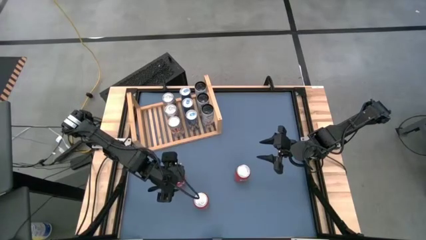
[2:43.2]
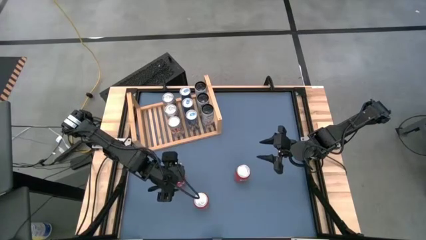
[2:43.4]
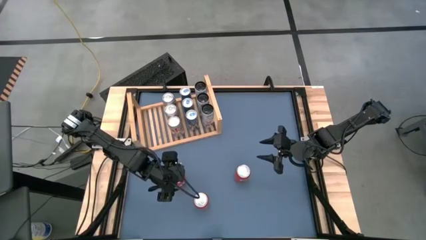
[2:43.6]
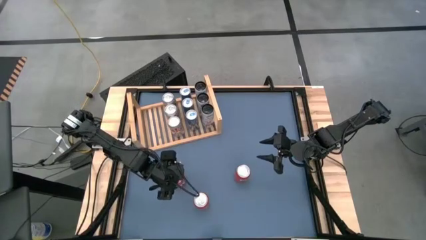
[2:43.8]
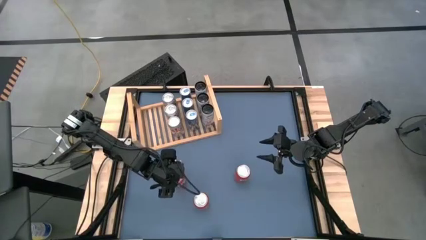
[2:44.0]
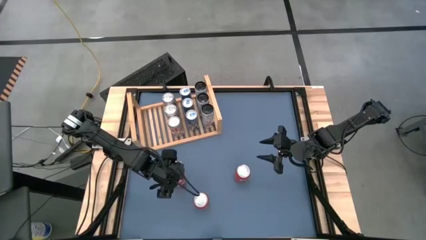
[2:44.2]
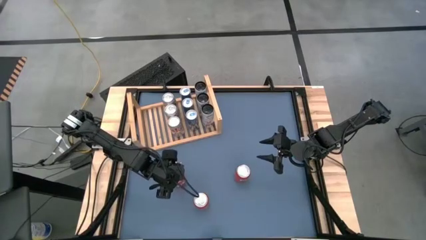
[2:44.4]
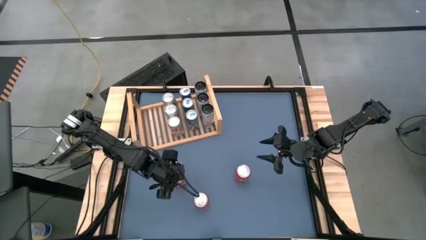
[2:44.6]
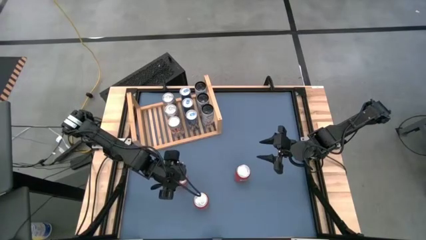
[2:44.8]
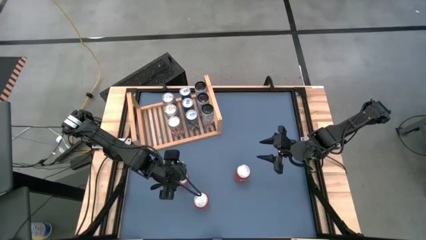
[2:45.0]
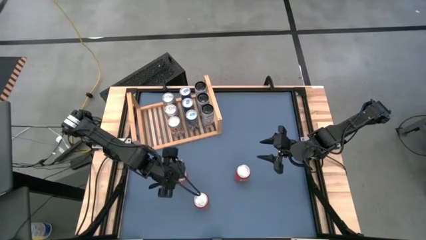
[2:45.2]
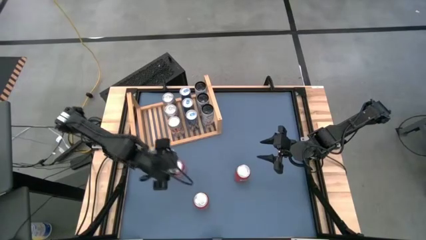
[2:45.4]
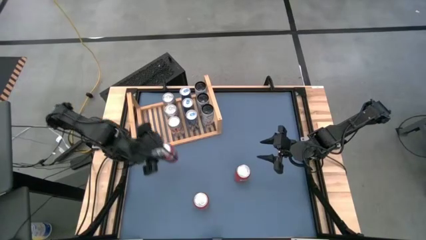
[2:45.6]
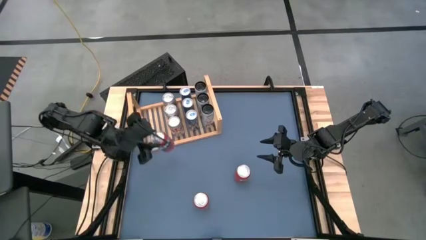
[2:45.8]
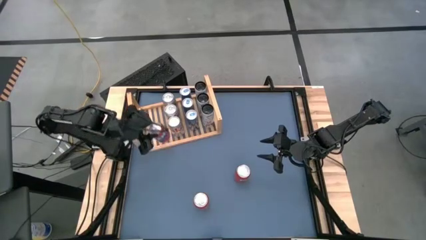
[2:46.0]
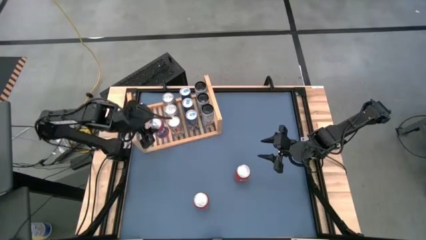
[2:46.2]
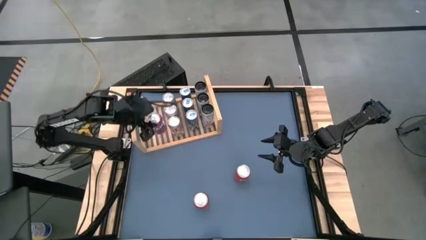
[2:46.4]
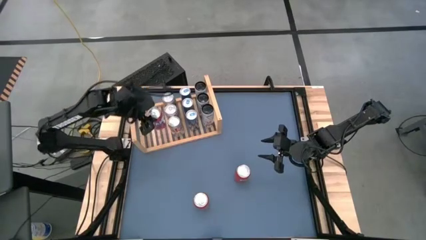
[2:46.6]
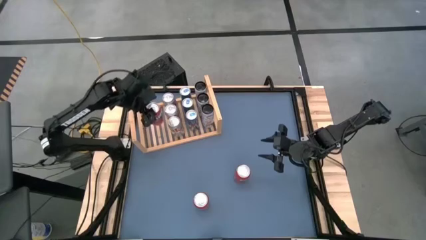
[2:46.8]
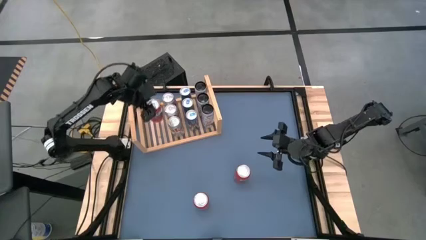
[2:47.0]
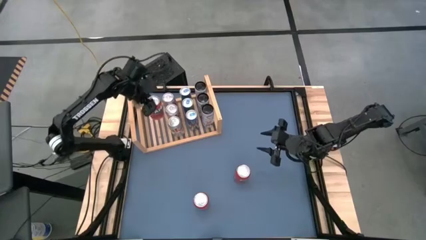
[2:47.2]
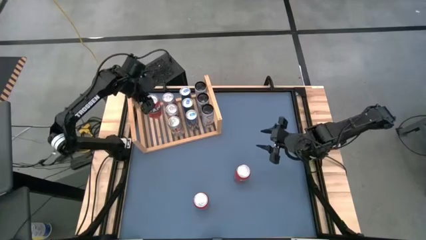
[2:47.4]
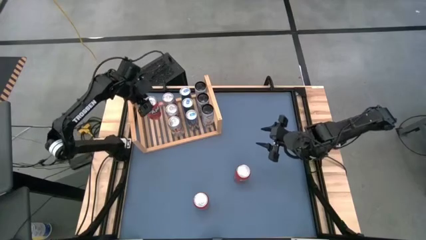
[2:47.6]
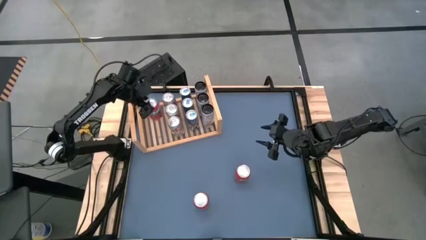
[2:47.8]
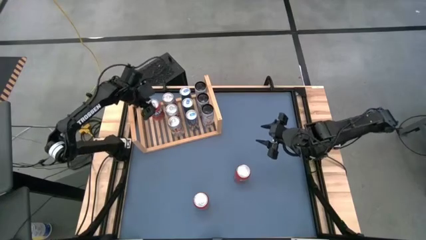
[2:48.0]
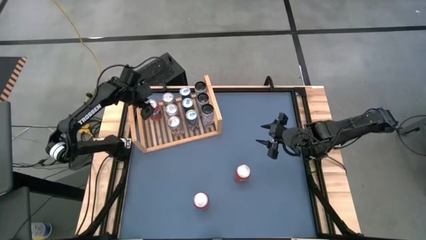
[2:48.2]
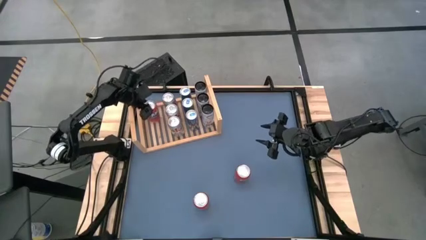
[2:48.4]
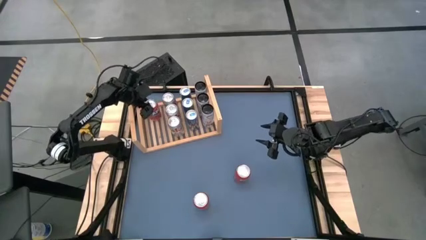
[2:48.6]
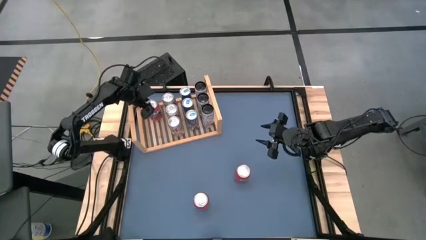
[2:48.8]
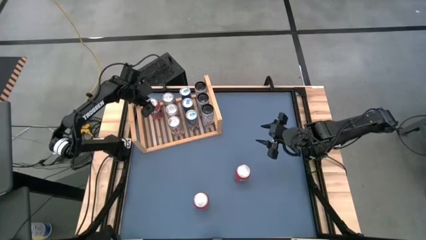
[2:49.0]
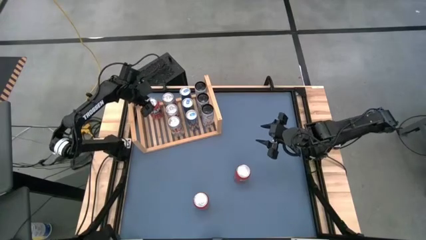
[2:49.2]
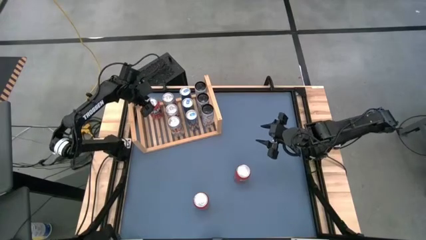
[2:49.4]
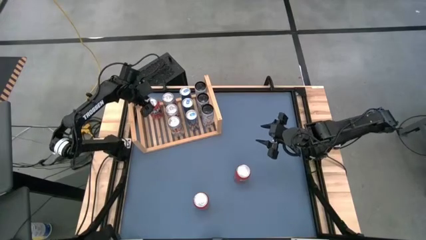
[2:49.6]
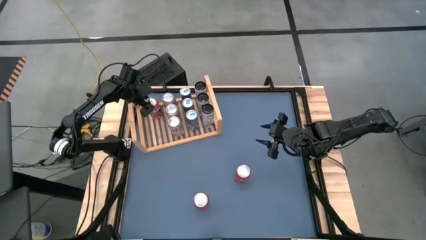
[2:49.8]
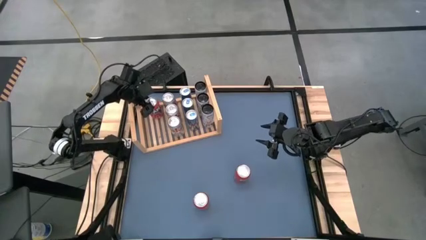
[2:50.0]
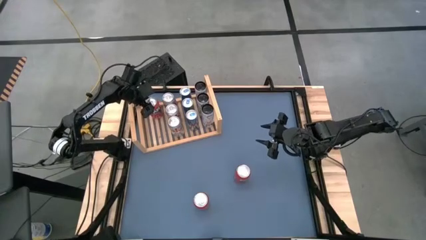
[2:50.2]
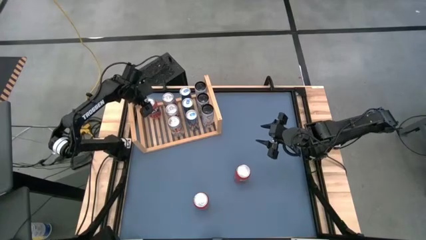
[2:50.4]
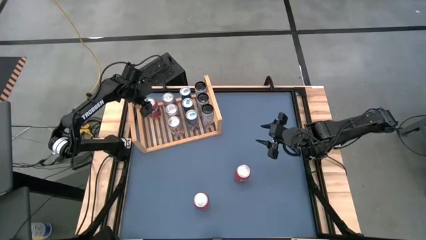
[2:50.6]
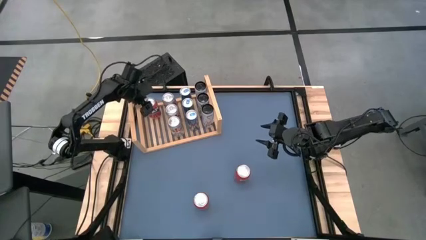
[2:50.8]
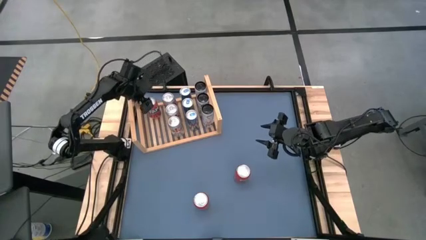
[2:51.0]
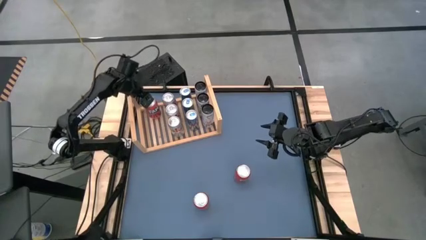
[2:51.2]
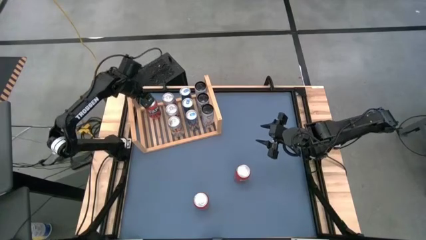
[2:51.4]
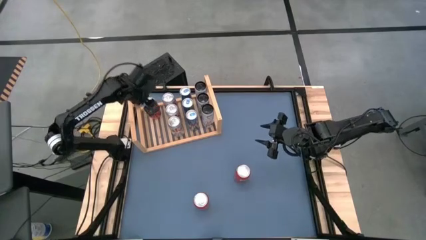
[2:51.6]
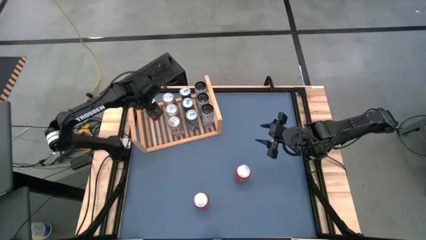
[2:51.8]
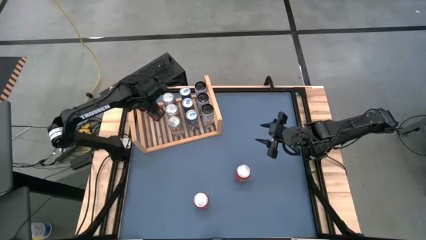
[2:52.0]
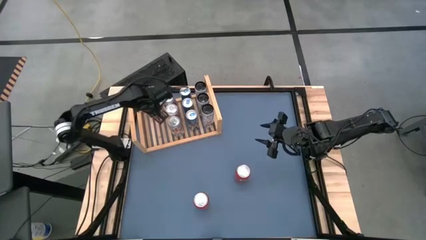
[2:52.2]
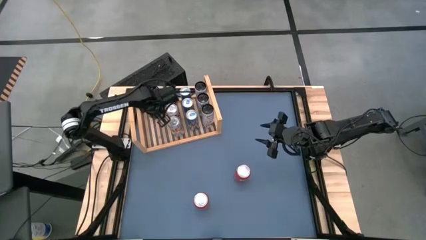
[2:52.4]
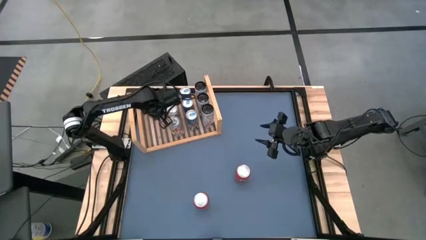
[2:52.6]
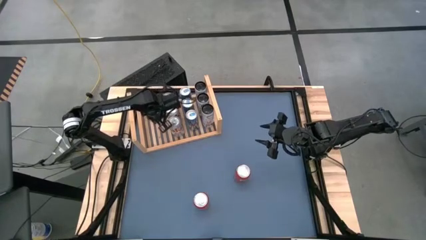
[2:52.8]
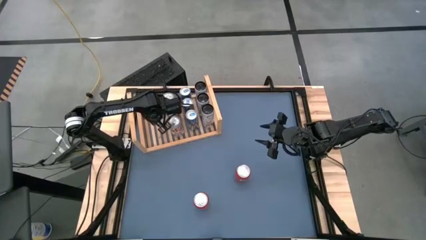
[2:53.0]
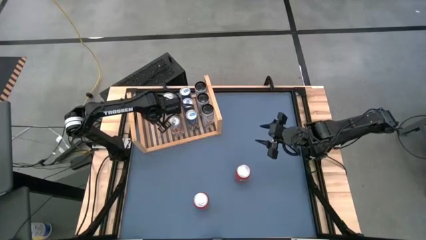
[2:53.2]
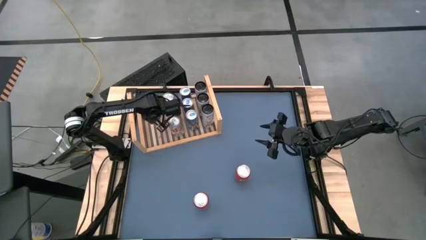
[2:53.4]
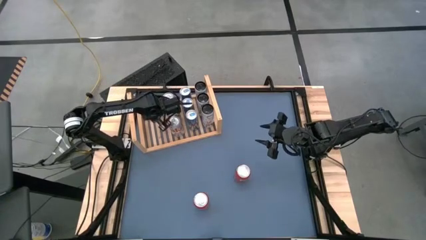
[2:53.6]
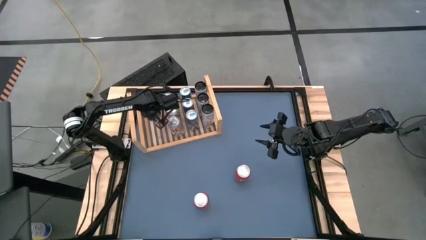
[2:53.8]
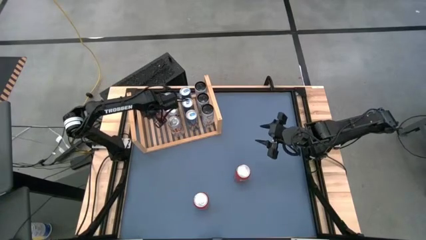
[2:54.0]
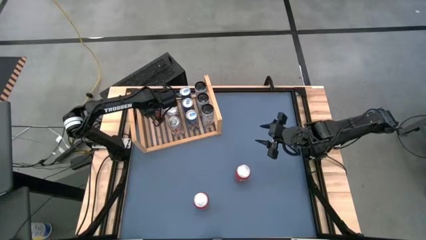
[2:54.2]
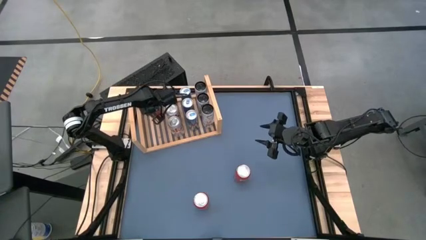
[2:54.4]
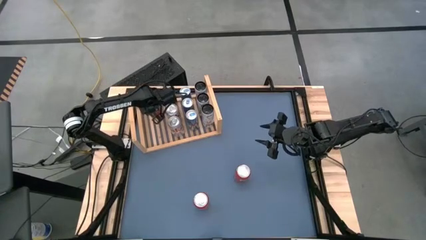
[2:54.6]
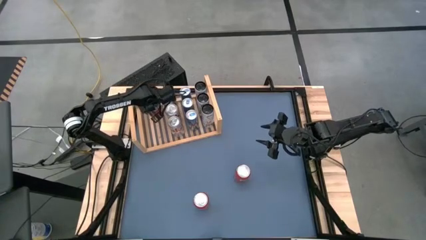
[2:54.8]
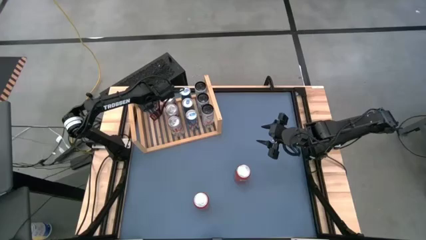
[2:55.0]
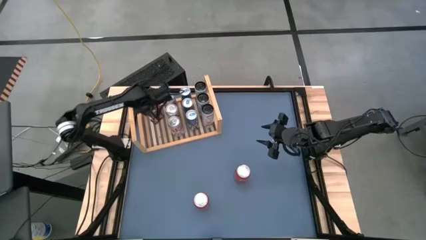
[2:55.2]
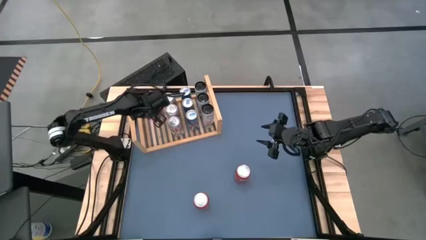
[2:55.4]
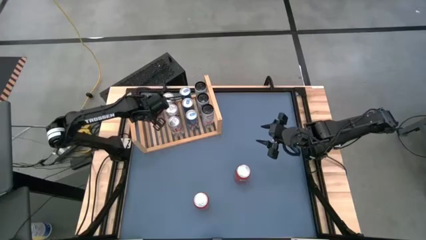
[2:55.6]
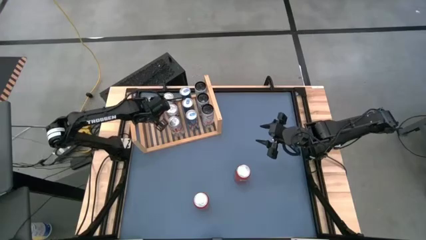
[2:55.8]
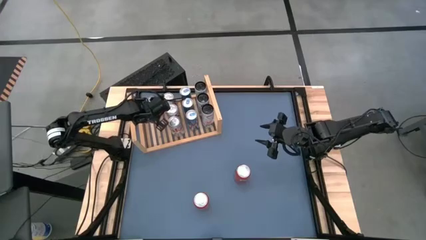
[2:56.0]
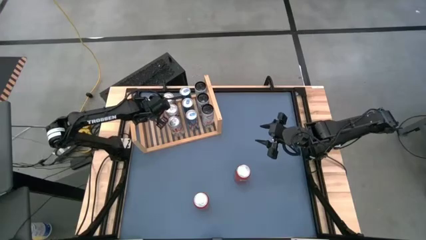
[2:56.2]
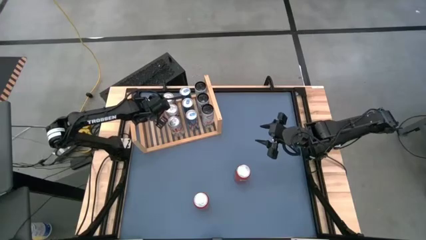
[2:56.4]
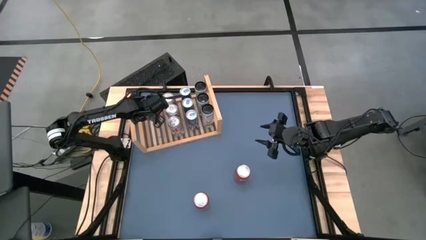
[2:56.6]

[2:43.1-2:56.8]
Task: Place canned beverage on shelf
Put the top left red soda can on the shelf

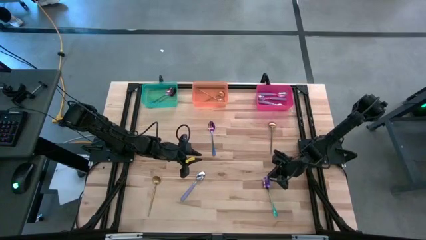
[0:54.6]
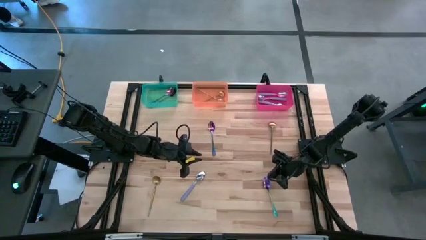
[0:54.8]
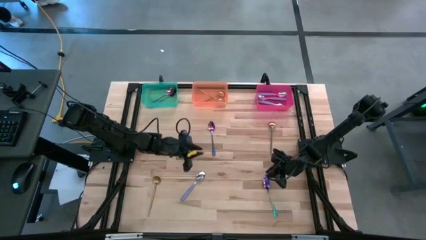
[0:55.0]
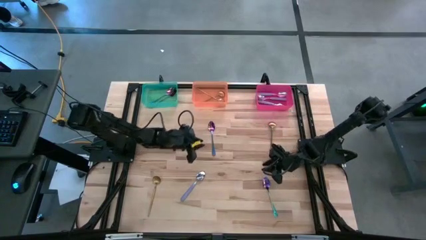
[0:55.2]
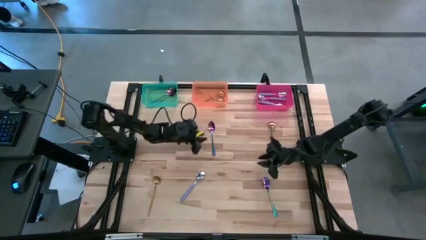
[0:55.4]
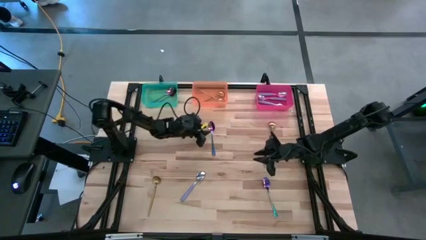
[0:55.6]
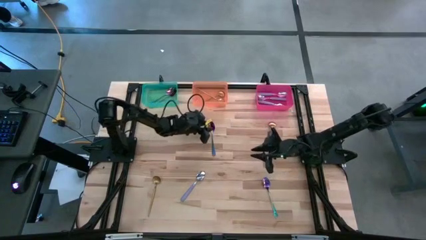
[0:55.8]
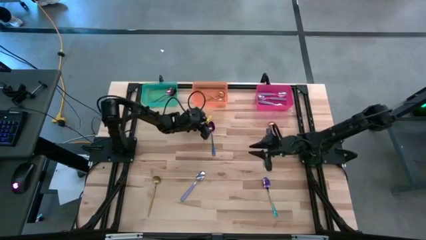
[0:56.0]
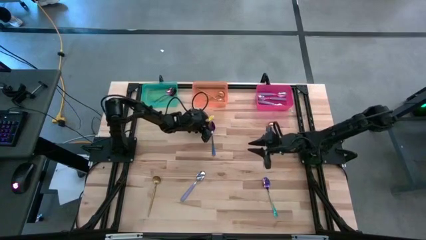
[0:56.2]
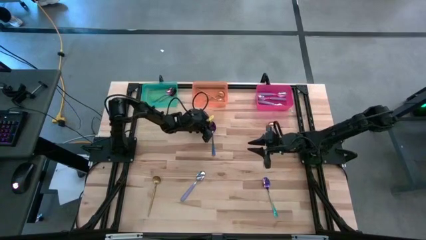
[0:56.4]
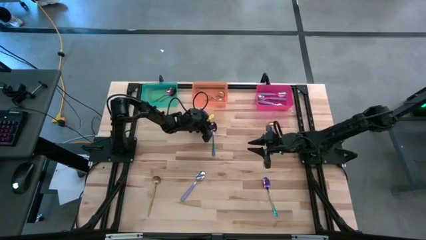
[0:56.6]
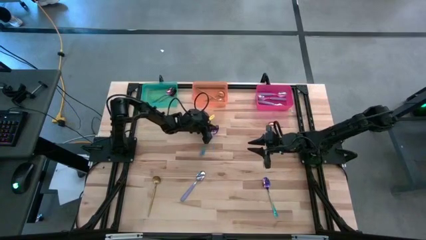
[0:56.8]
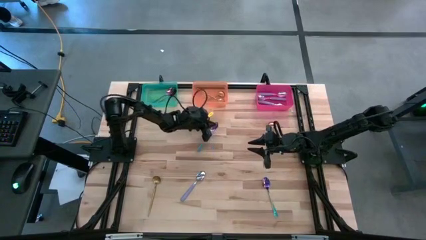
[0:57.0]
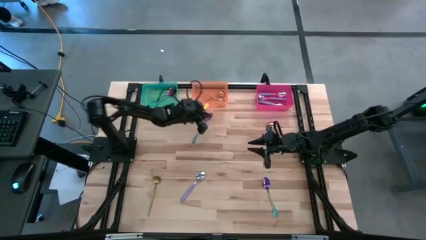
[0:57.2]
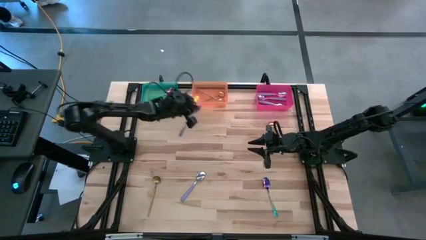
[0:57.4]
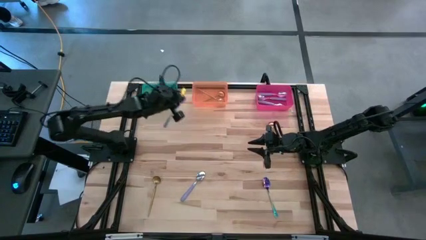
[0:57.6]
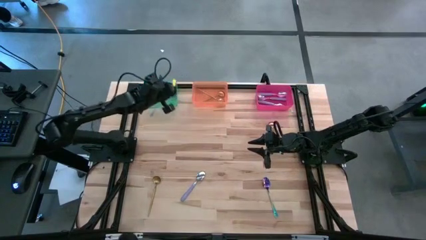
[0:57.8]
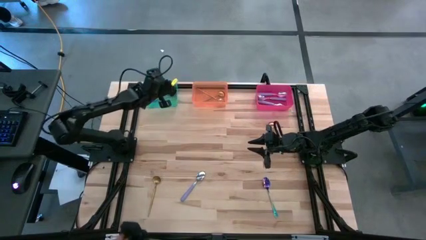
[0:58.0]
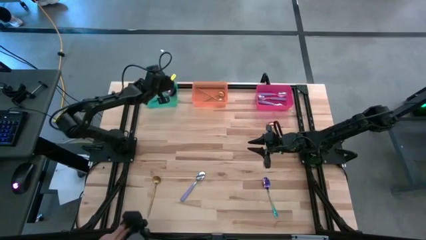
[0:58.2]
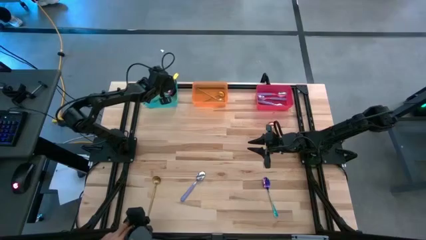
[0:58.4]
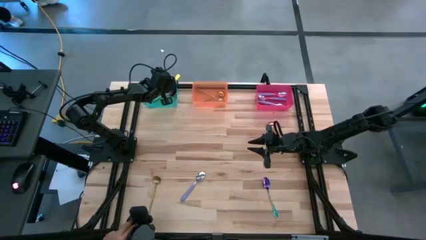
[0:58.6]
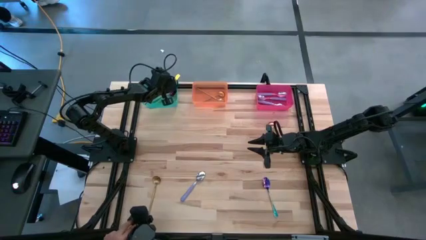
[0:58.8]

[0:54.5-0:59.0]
Task: Sort silverware by color (type)
Put the blue spoon into the green bin
